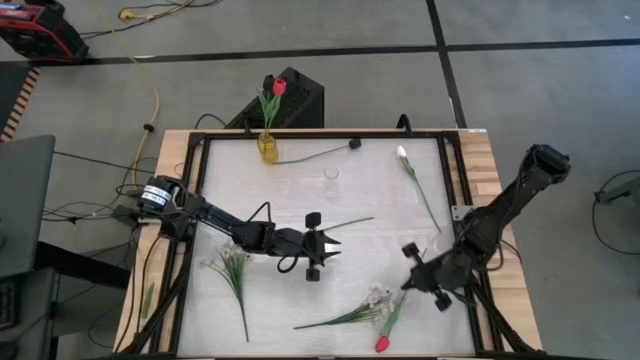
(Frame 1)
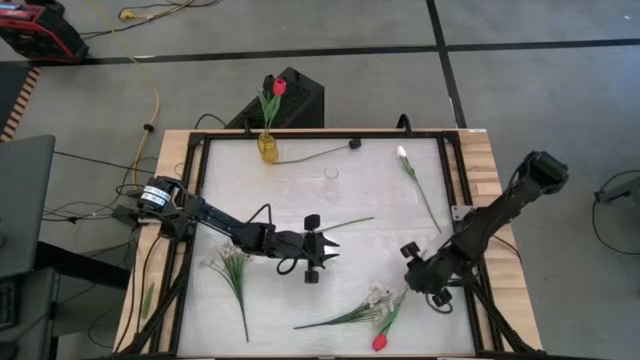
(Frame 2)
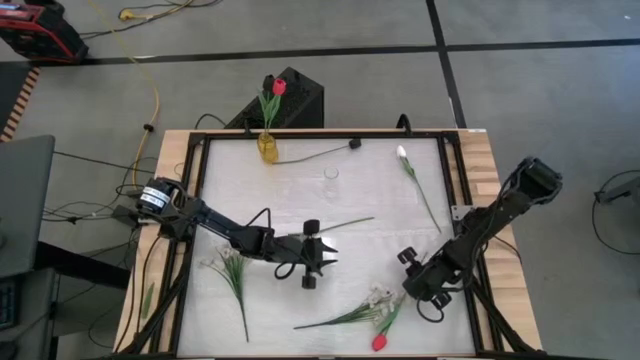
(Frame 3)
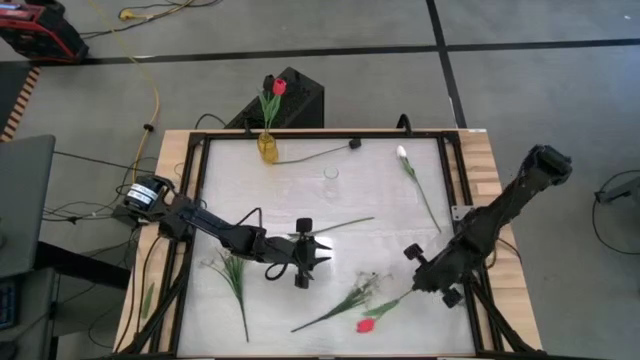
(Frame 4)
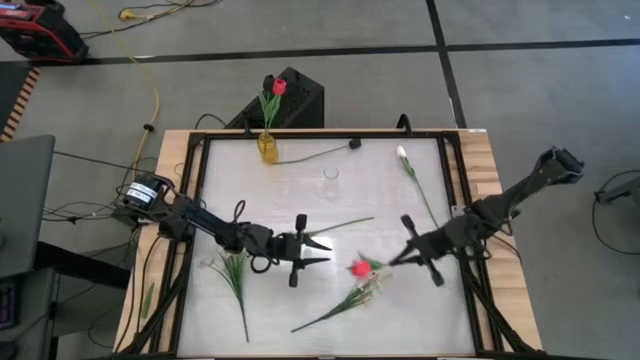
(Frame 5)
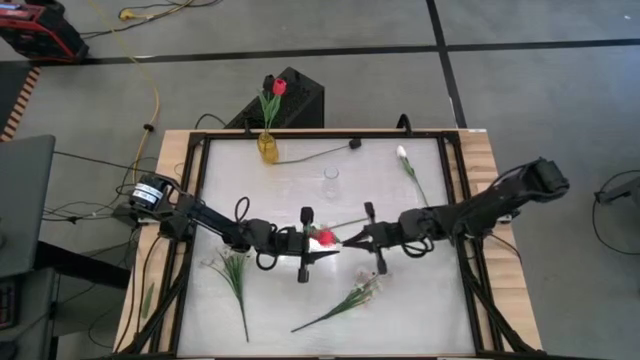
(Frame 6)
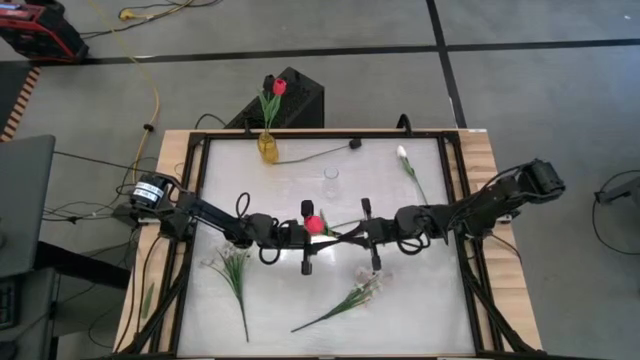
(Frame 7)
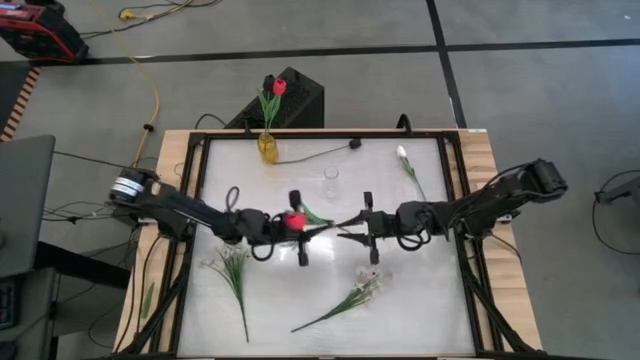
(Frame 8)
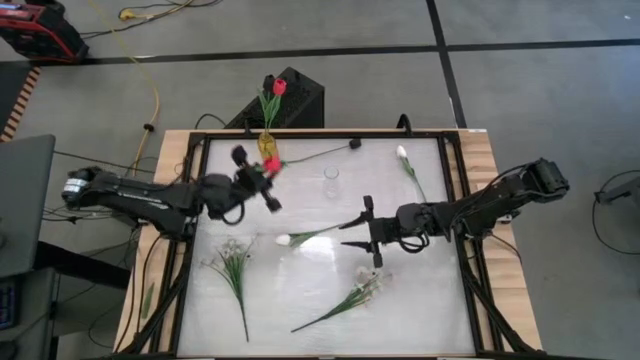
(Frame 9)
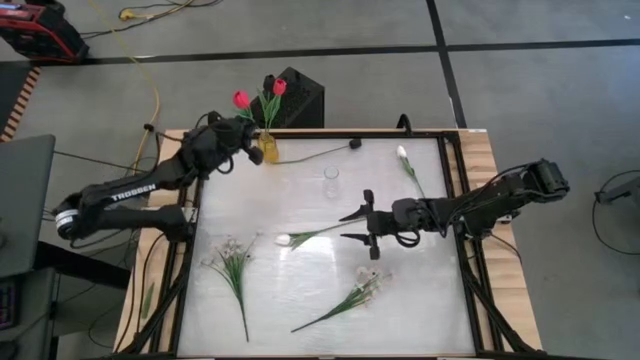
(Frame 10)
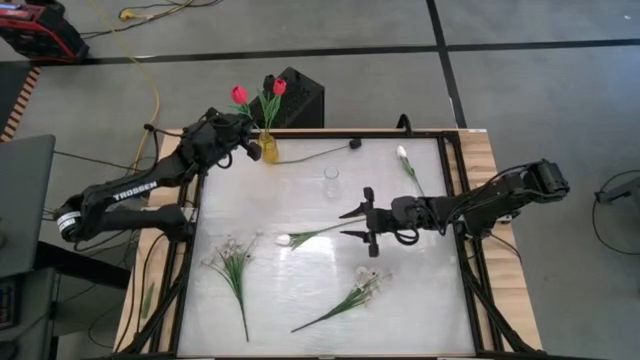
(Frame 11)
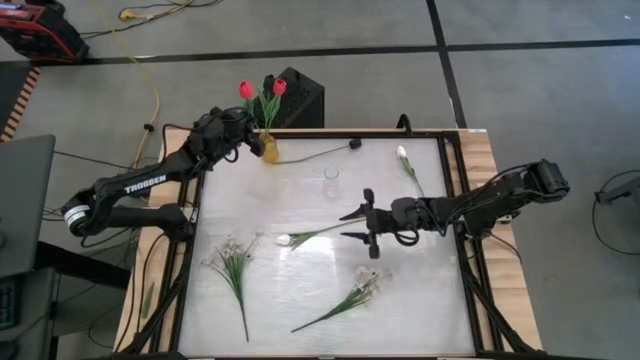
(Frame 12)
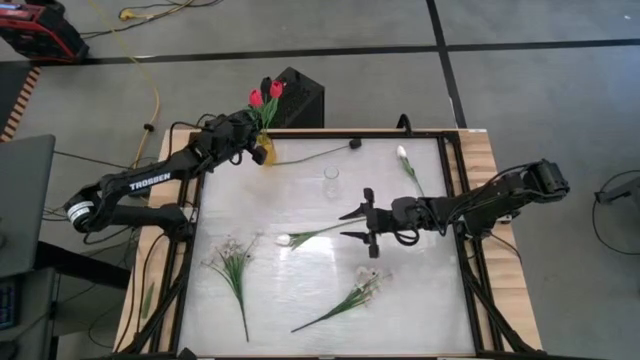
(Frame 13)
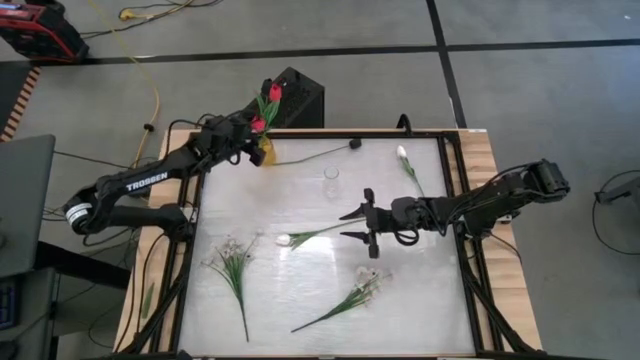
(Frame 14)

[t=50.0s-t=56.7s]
Task: Sort flowers into vase by color
Put the red flower into the yellow flower vase

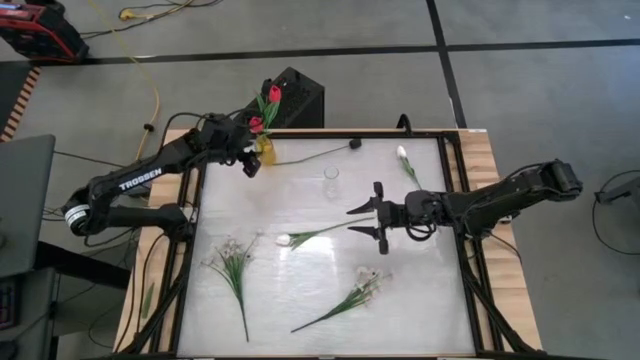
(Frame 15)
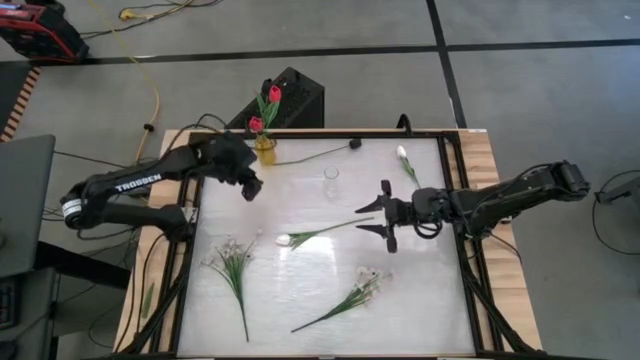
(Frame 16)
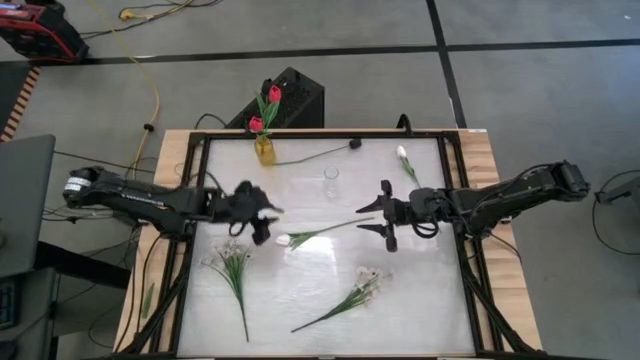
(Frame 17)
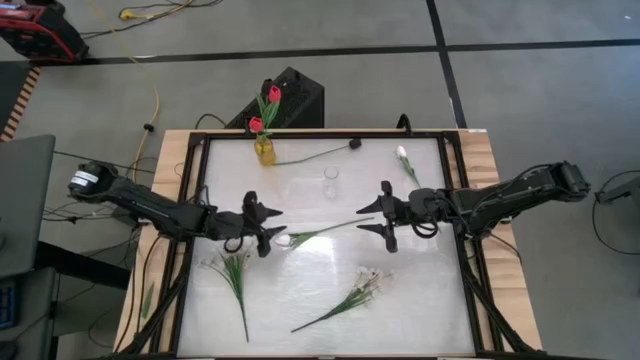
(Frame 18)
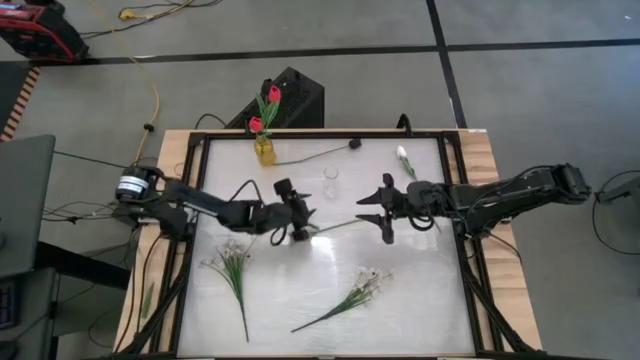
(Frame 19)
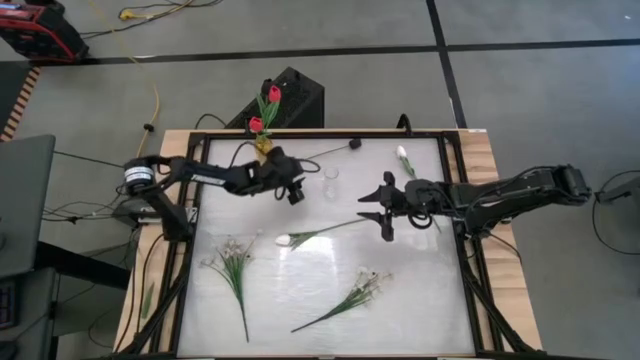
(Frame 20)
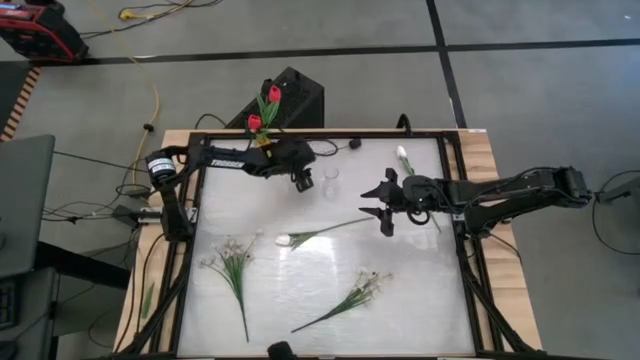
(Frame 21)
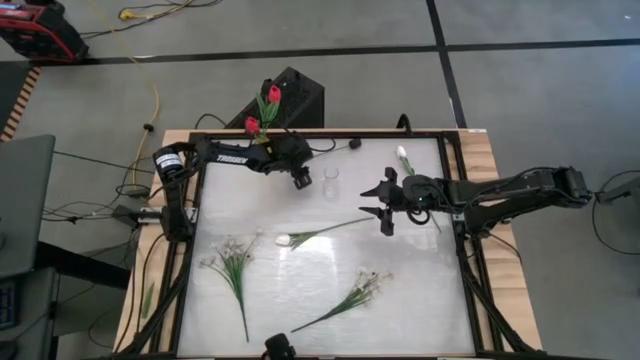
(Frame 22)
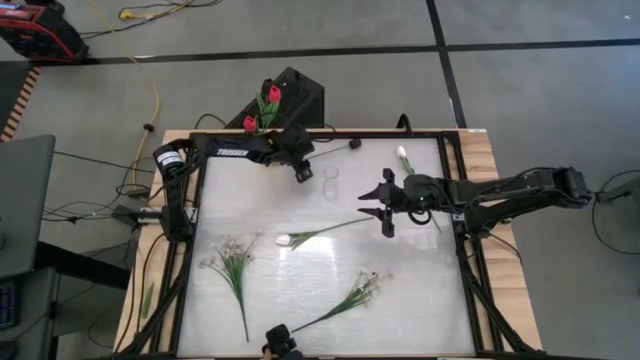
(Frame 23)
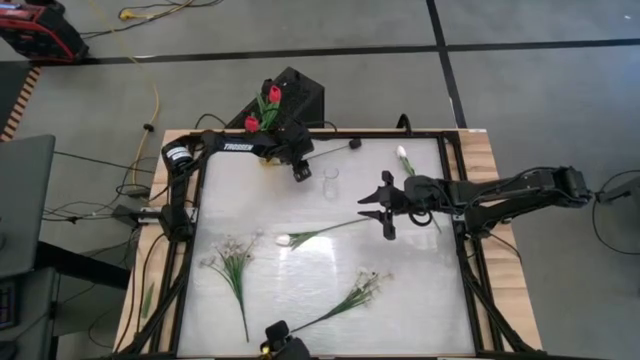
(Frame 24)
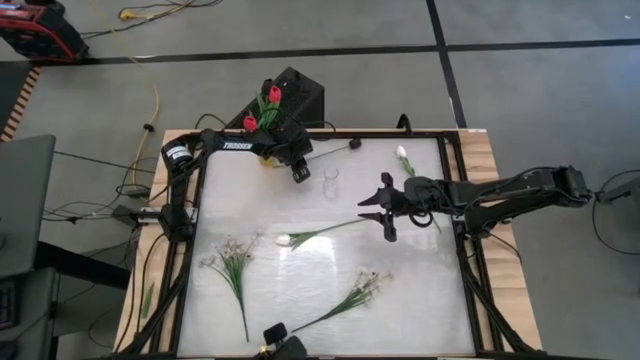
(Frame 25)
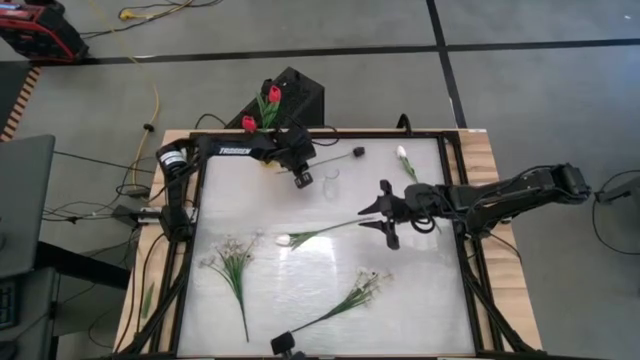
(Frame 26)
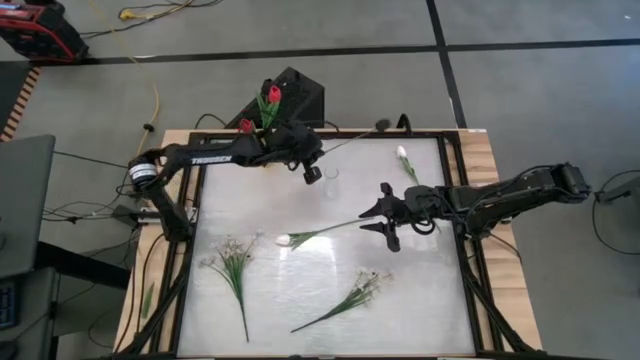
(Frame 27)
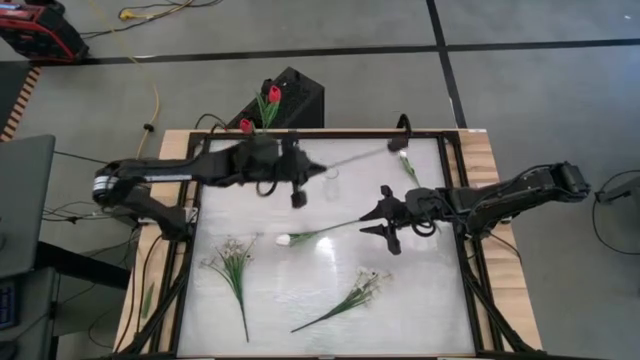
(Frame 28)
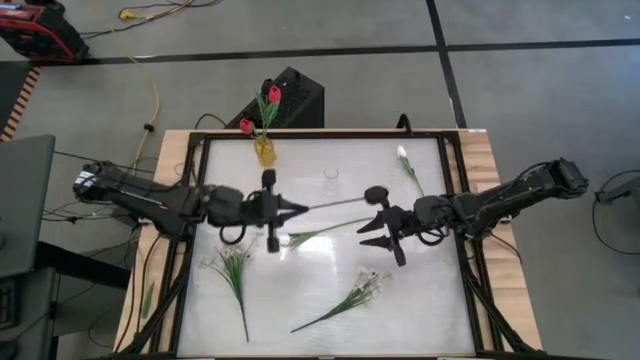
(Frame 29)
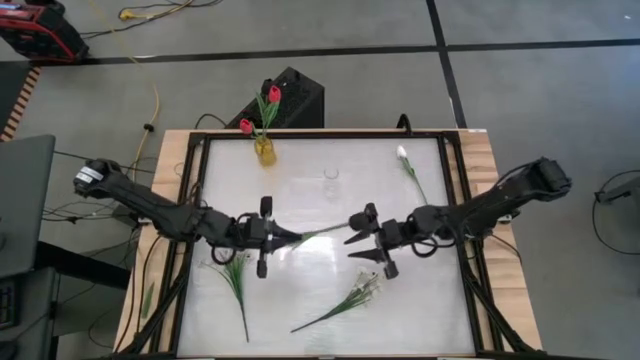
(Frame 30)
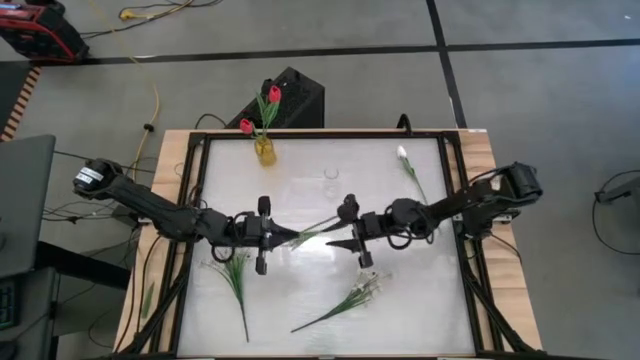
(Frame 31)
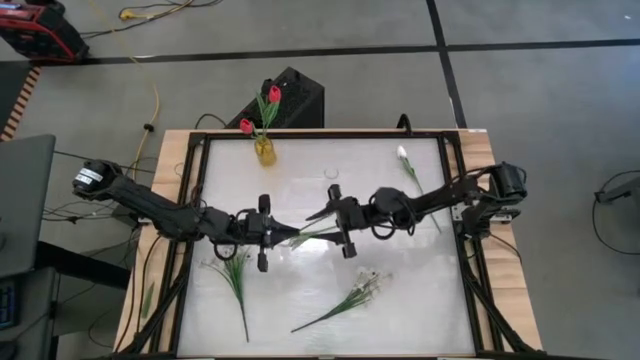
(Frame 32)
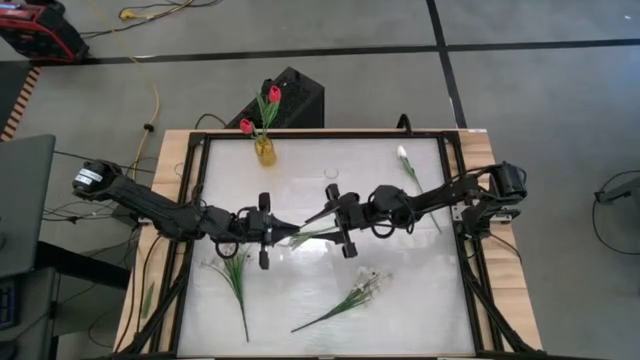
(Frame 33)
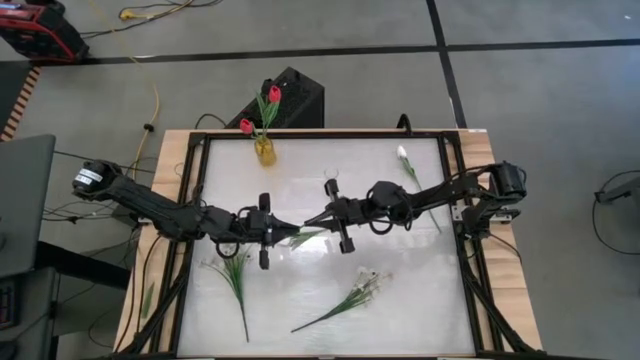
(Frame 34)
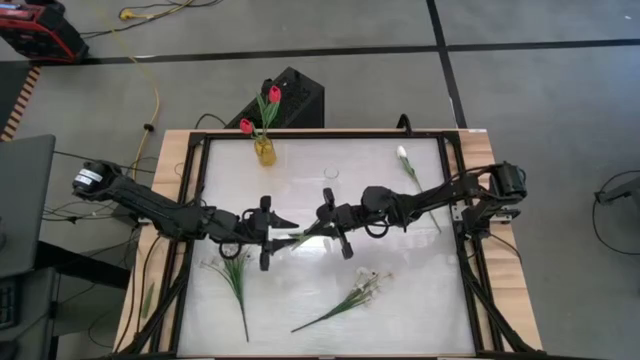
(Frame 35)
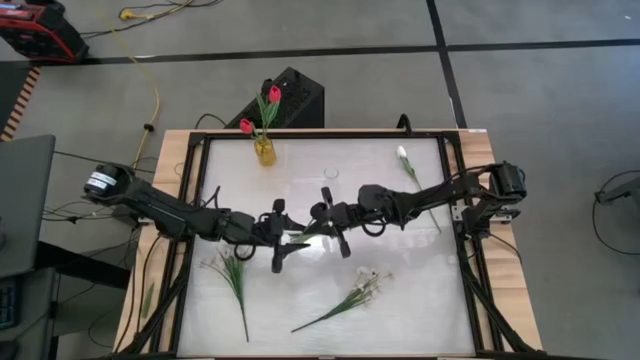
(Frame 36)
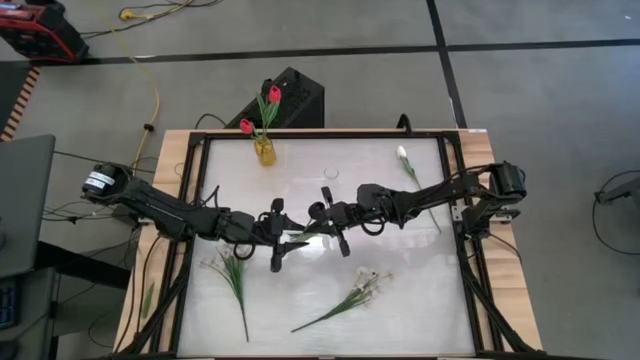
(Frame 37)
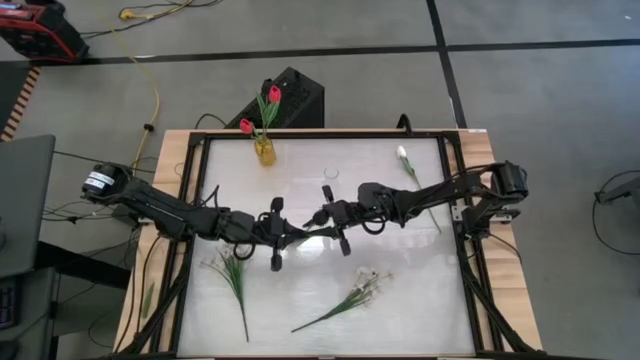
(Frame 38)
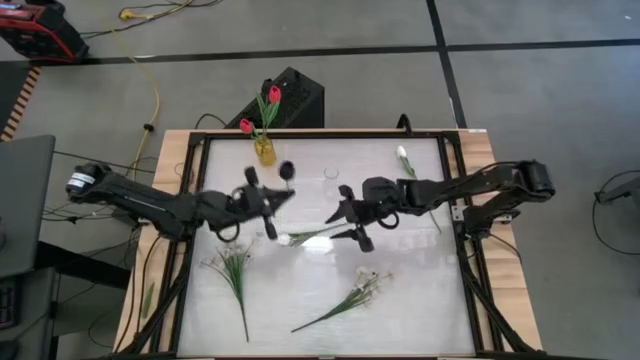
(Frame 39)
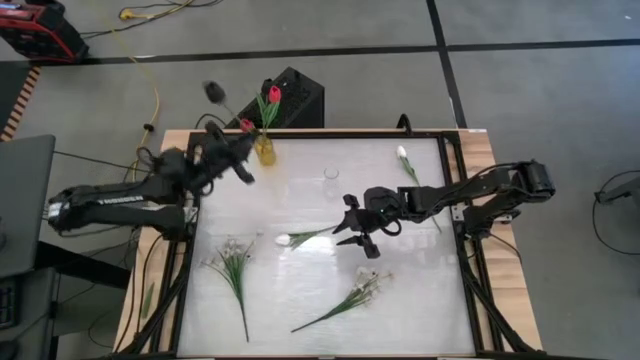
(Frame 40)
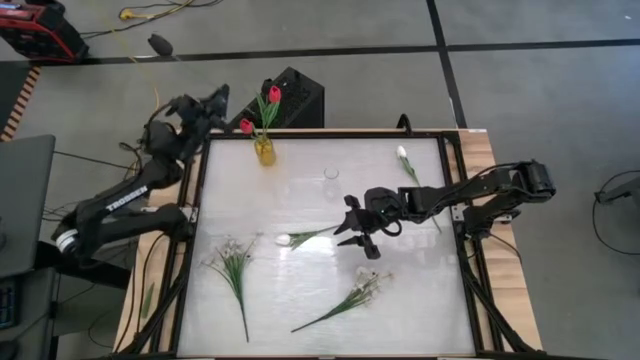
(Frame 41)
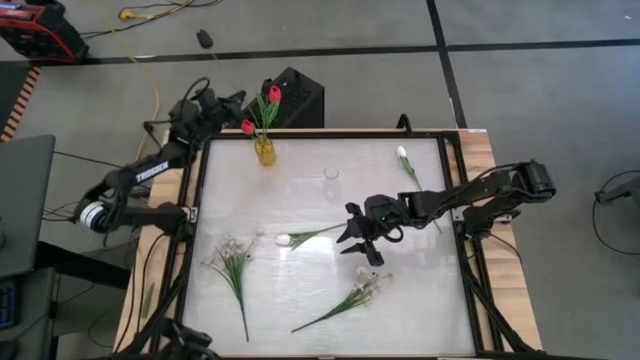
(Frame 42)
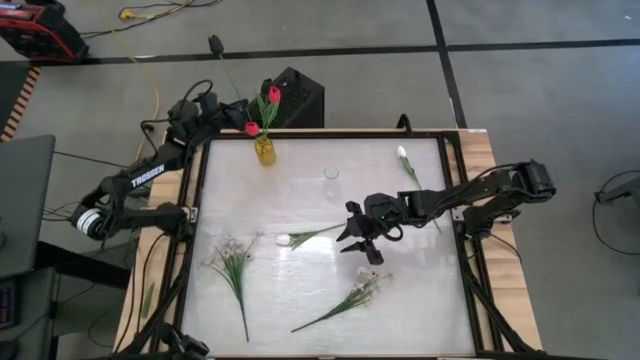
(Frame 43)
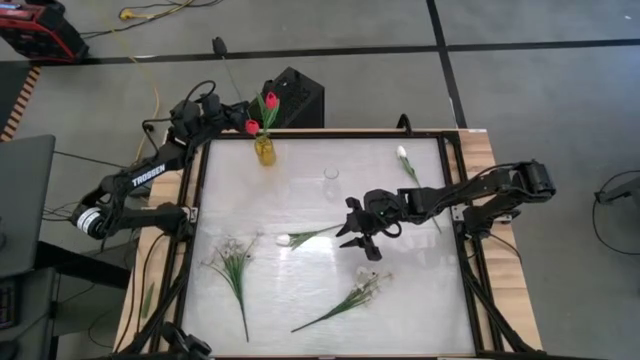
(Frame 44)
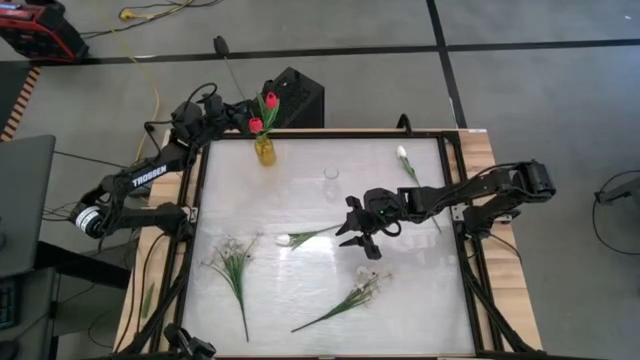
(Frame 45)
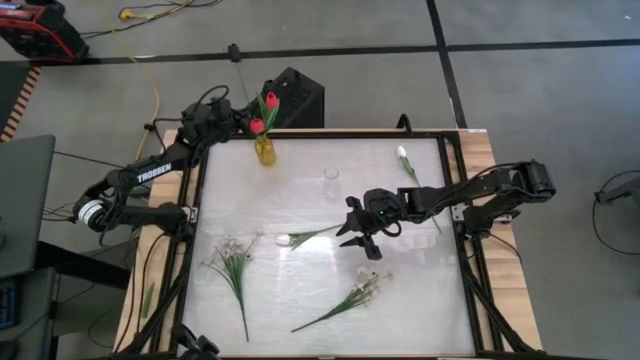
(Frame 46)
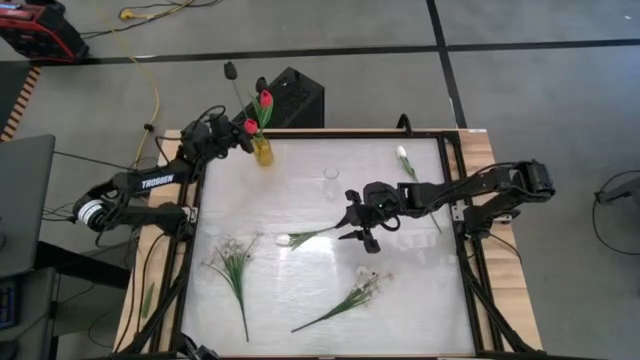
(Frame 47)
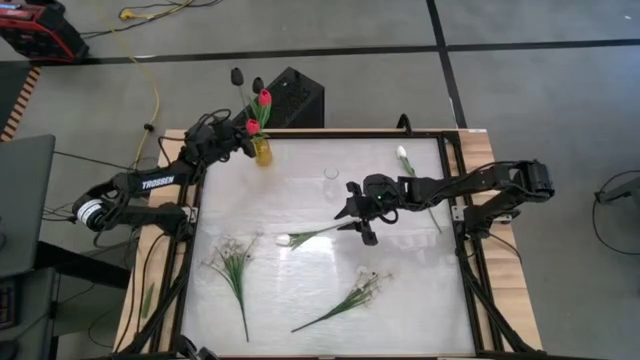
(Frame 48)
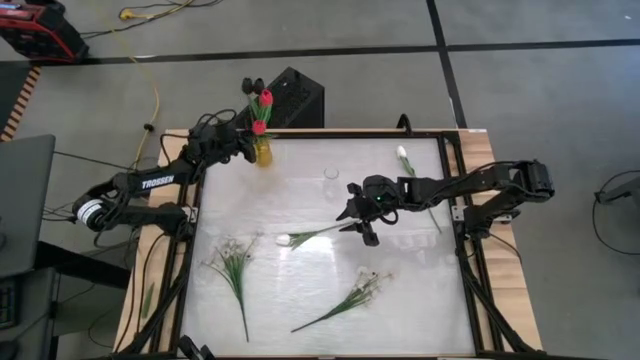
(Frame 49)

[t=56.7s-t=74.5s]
Put the black flower into the yellow flower vase
